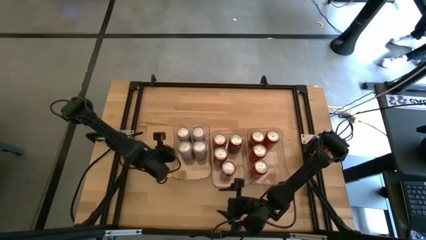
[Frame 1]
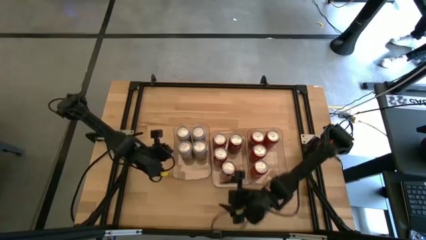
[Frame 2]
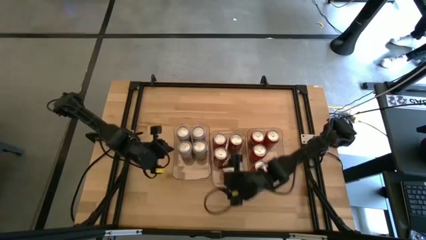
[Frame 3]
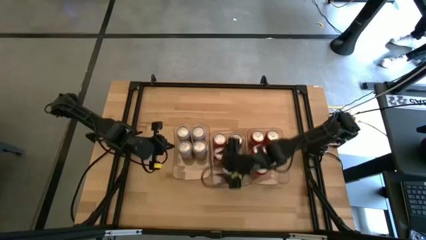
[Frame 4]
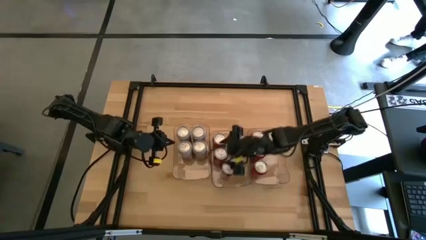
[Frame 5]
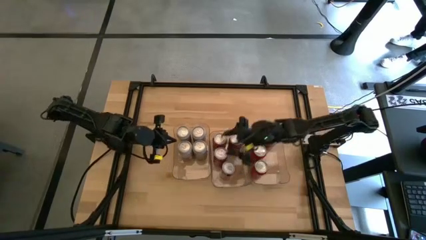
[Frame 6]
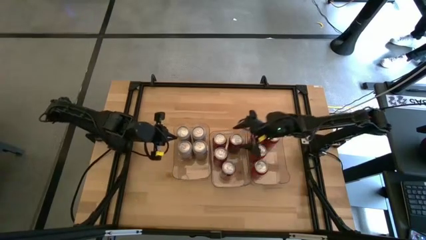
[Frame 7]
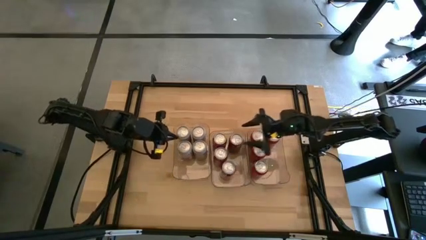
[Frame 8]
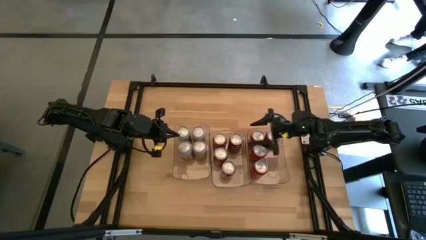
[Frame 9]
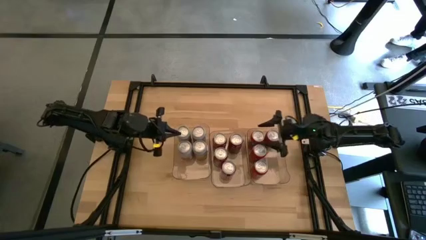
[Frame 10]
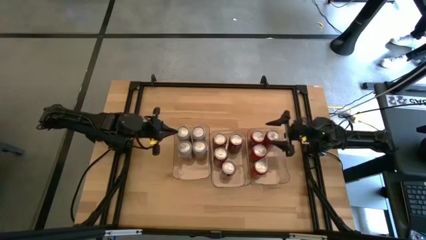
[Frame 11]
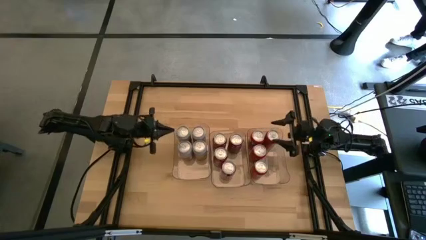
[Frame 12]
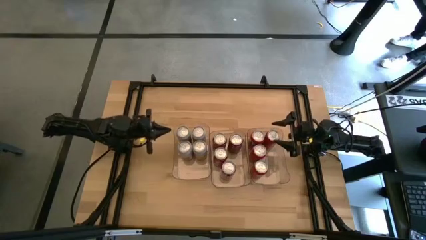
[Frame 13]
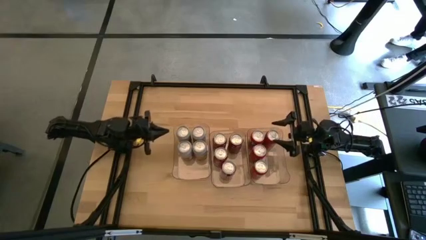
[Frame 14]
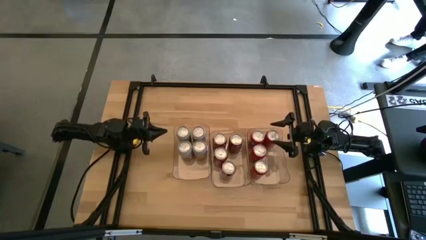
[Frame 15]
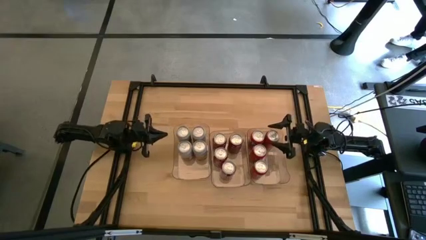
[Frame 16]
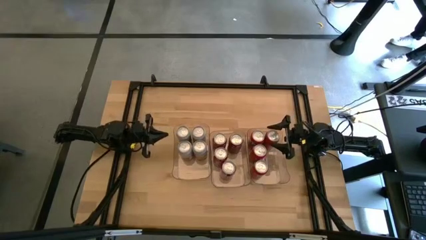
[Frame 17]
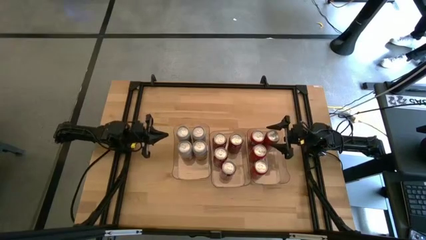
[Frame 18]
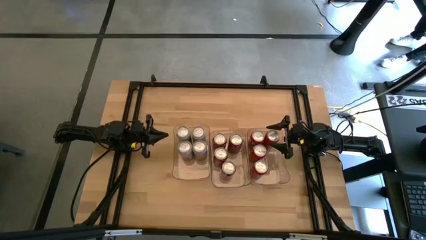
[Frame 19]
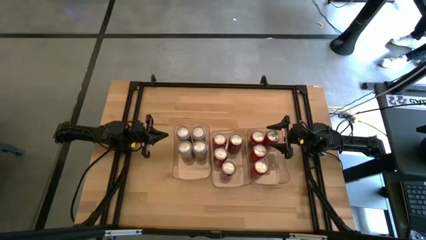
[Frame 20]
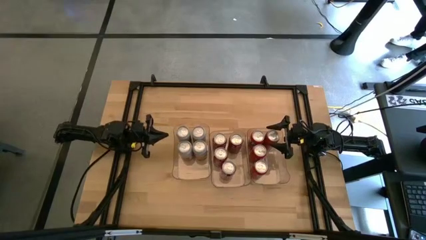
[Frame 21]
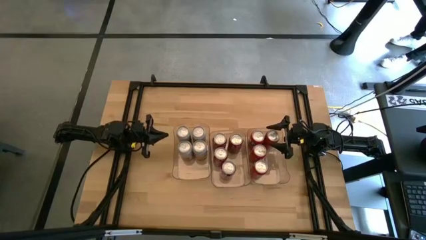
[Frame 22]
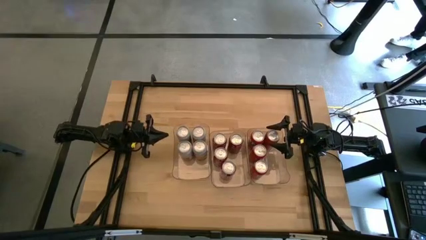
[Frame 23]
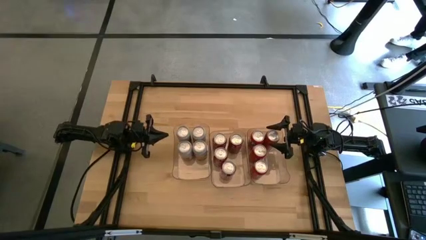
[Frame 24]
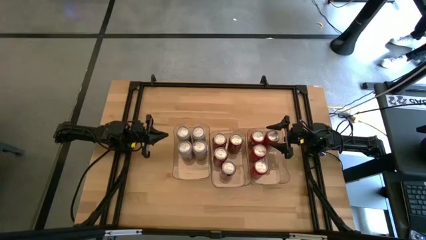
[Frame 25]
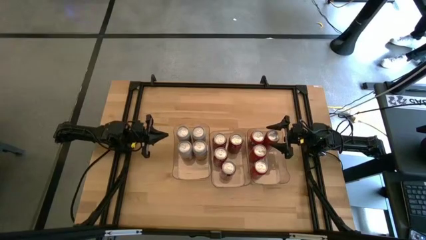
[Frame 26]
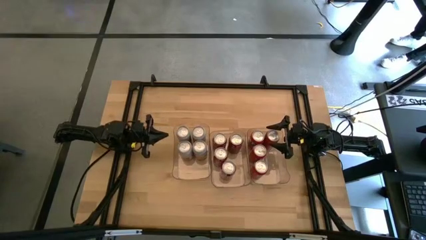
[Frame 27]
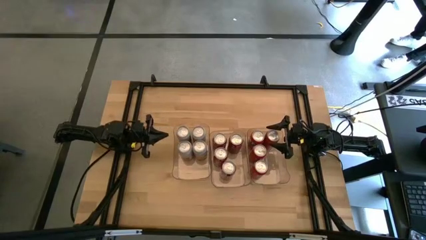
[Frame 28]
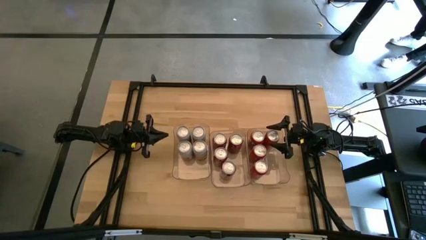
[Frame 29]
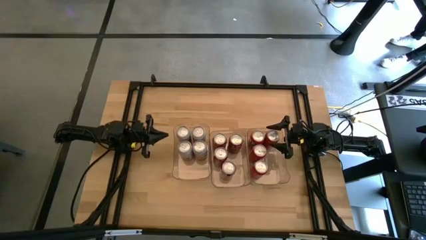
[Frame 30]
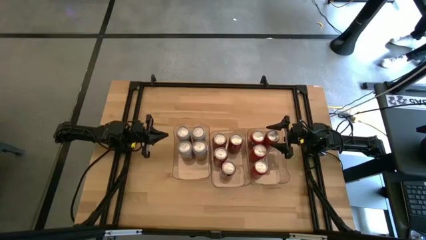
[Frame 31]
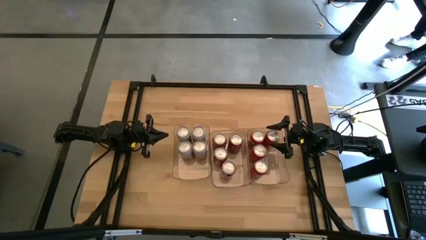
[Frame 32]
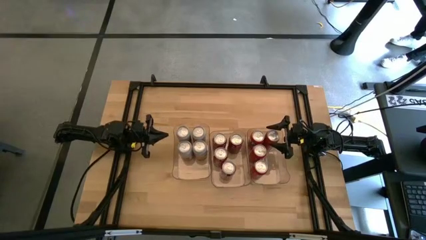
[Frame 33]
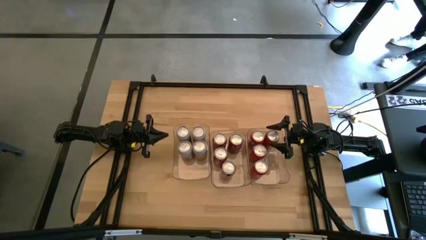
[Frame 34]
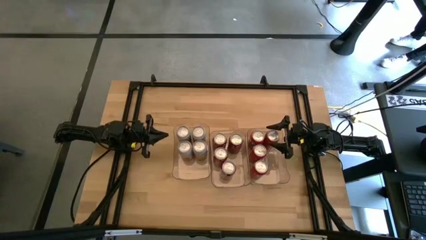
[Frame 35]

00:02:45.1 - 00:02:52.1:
Task: Sort soda cans
Return to Home Position

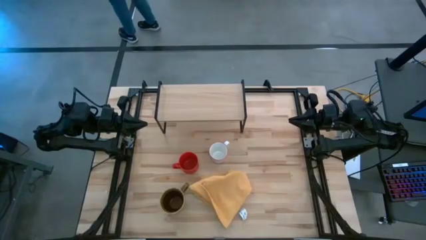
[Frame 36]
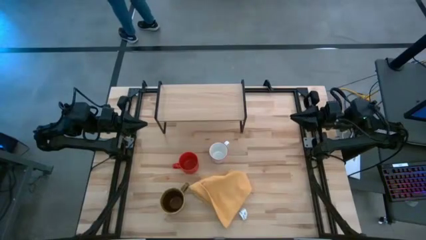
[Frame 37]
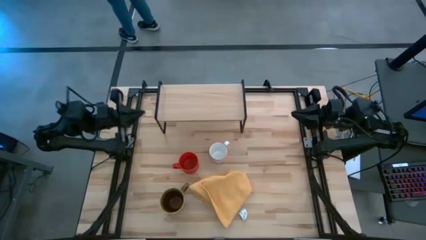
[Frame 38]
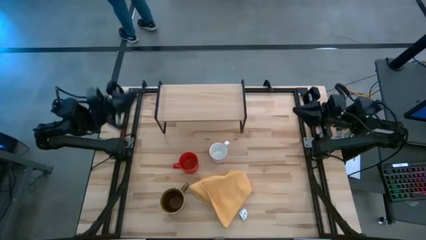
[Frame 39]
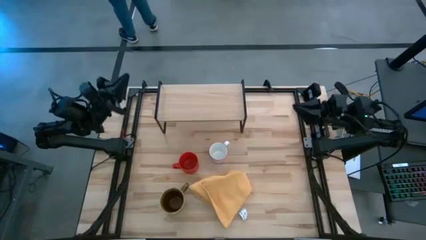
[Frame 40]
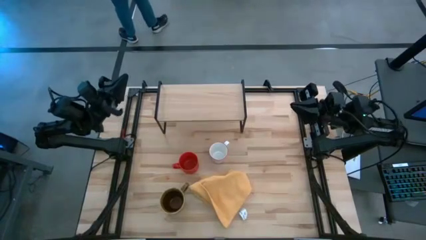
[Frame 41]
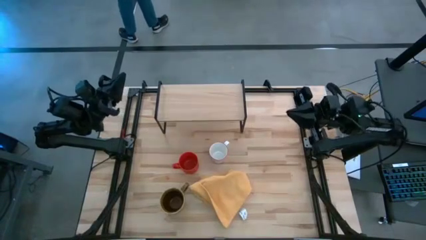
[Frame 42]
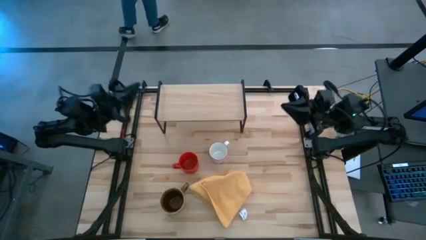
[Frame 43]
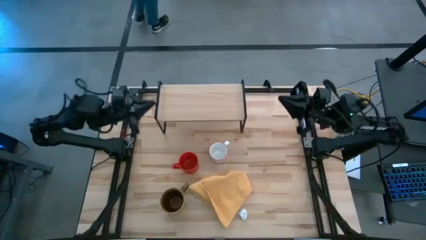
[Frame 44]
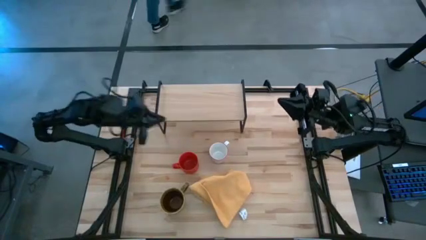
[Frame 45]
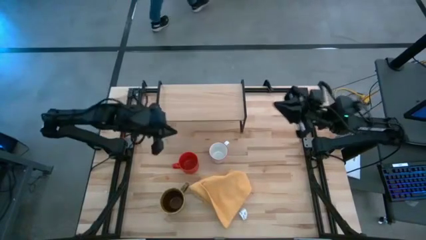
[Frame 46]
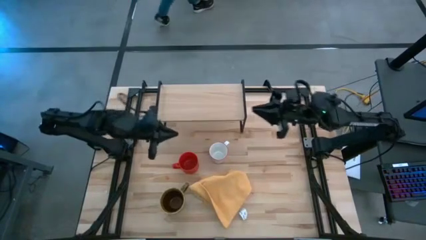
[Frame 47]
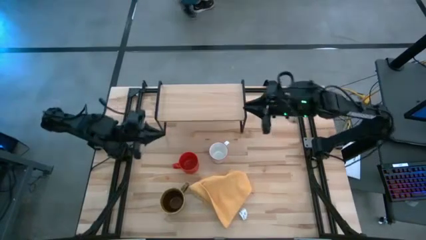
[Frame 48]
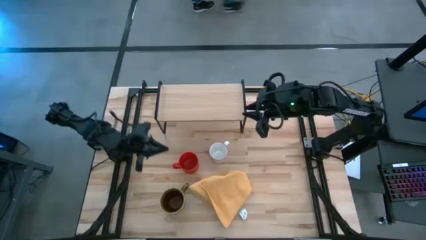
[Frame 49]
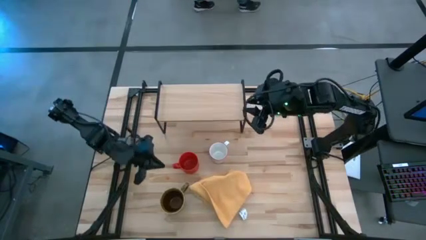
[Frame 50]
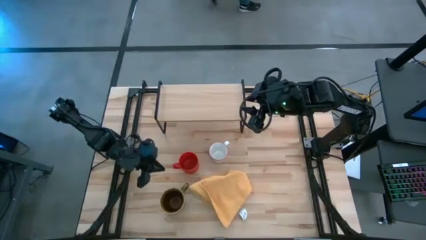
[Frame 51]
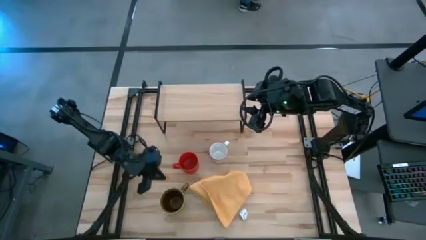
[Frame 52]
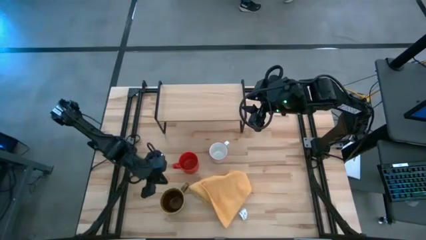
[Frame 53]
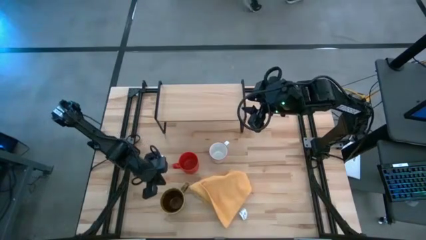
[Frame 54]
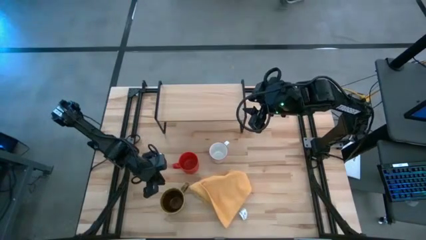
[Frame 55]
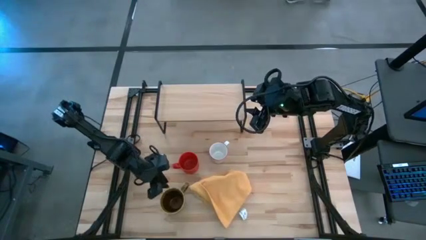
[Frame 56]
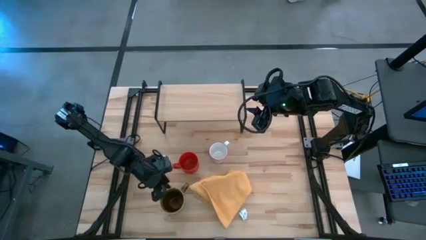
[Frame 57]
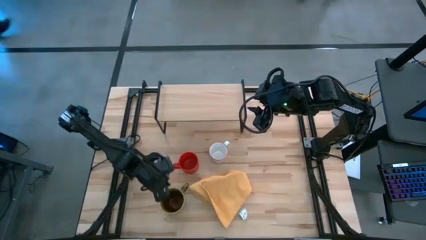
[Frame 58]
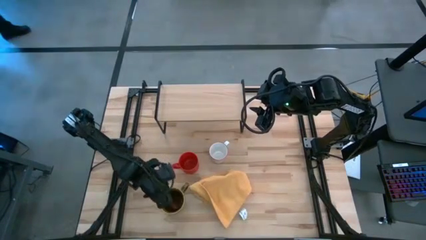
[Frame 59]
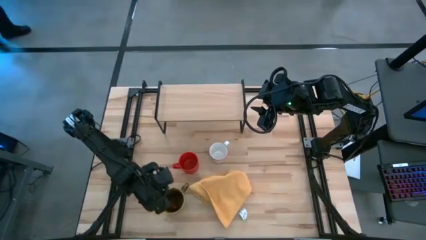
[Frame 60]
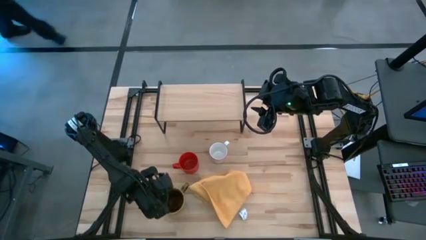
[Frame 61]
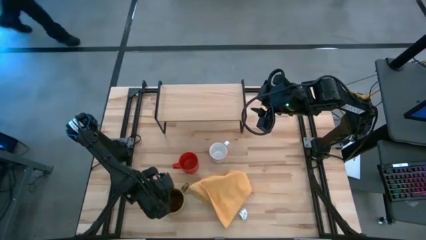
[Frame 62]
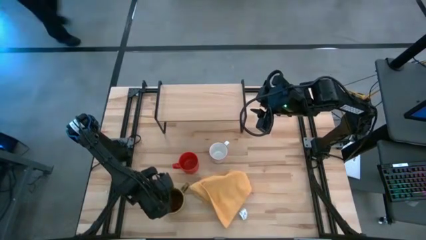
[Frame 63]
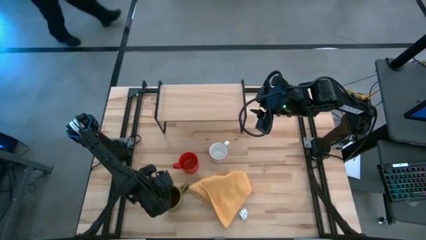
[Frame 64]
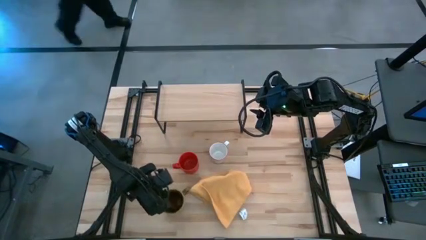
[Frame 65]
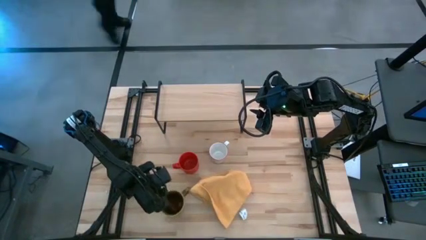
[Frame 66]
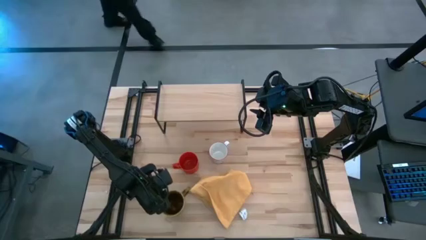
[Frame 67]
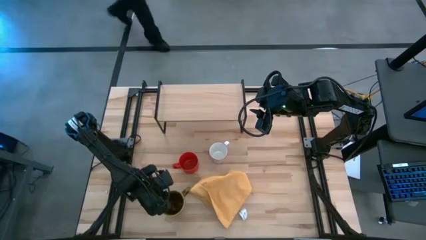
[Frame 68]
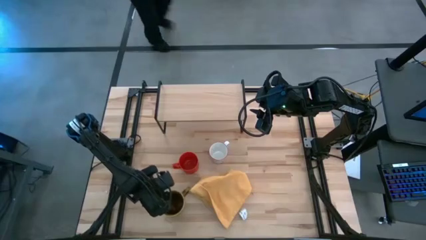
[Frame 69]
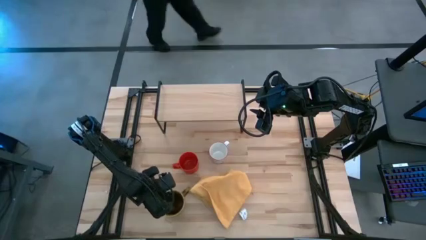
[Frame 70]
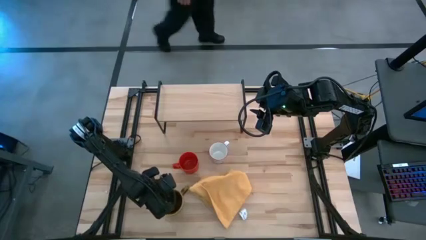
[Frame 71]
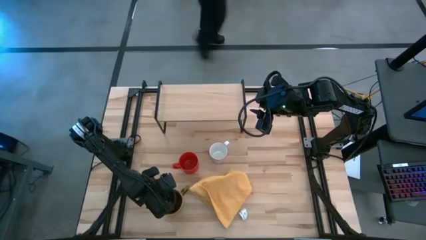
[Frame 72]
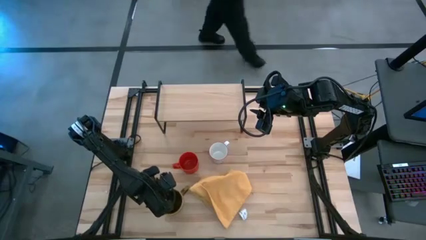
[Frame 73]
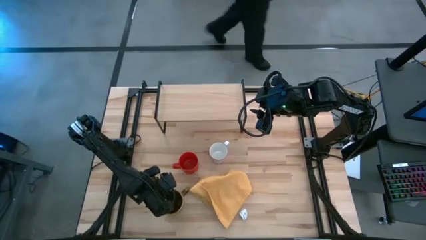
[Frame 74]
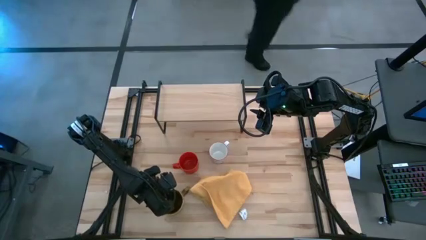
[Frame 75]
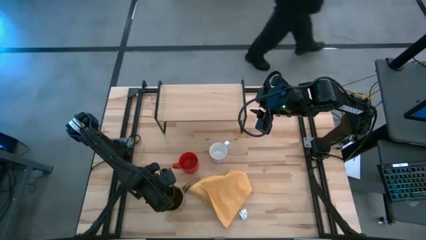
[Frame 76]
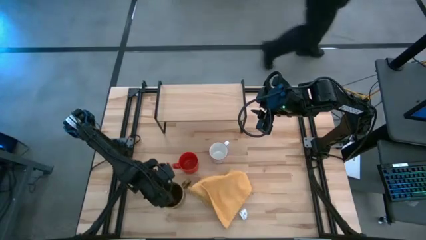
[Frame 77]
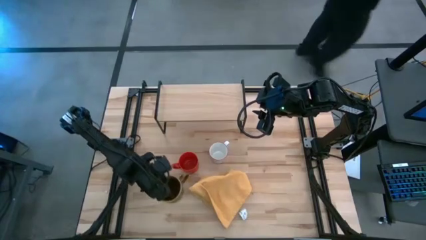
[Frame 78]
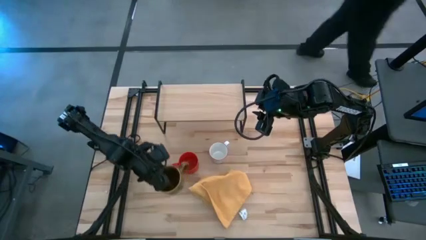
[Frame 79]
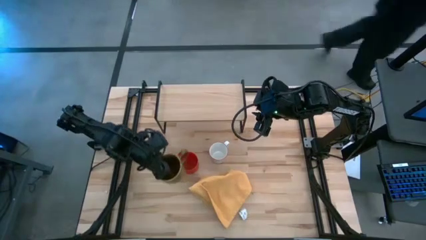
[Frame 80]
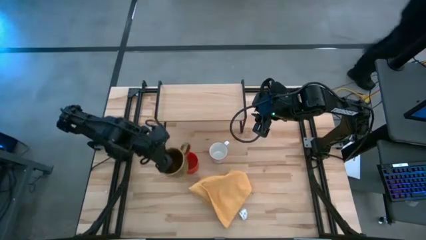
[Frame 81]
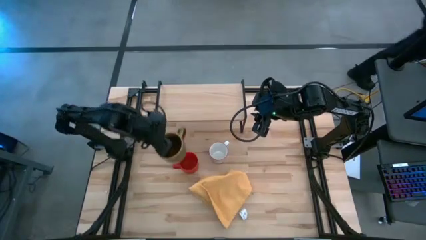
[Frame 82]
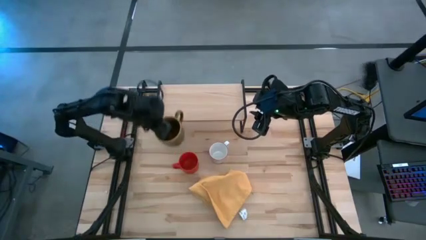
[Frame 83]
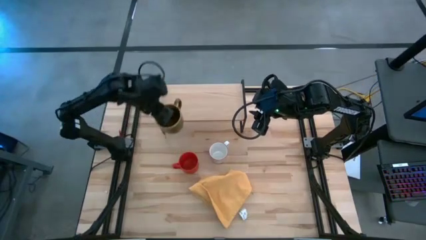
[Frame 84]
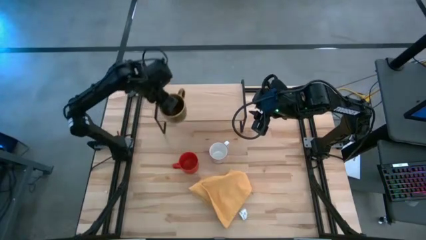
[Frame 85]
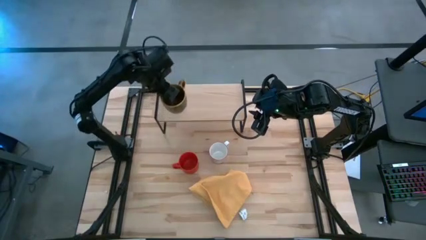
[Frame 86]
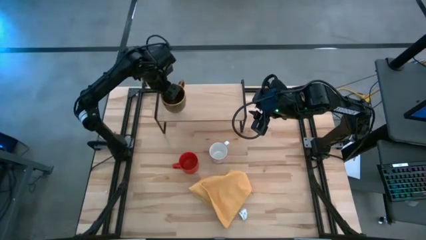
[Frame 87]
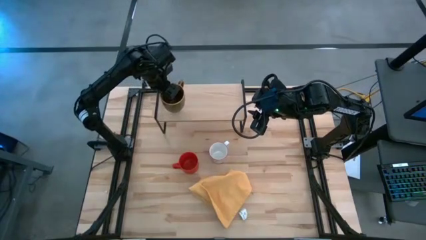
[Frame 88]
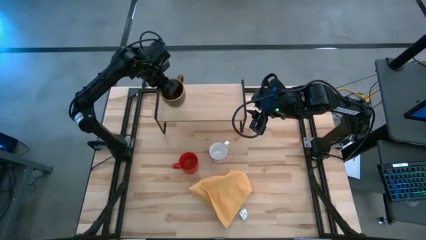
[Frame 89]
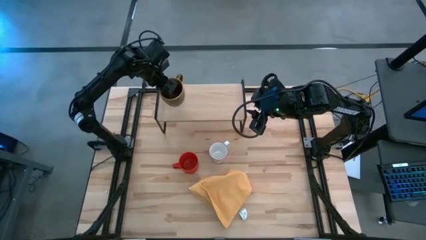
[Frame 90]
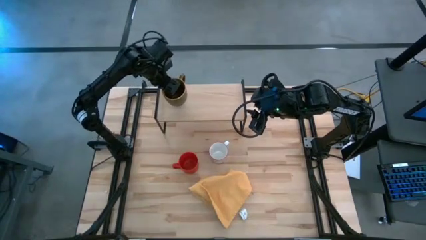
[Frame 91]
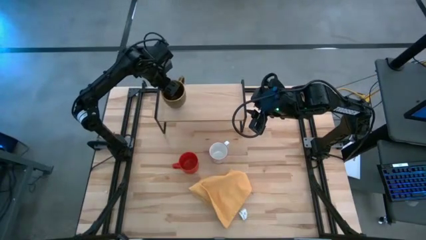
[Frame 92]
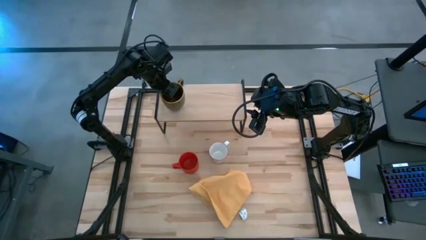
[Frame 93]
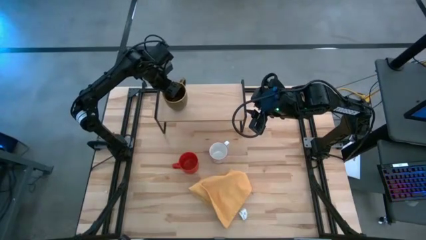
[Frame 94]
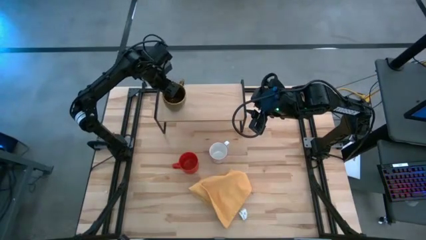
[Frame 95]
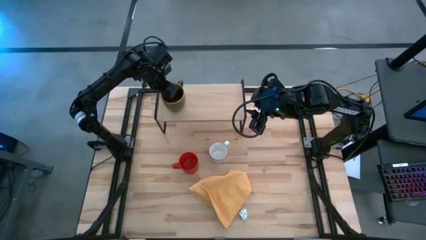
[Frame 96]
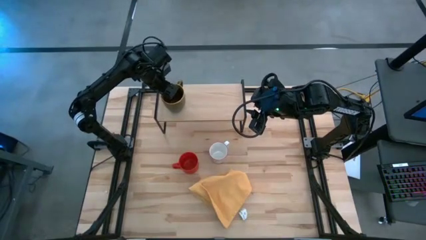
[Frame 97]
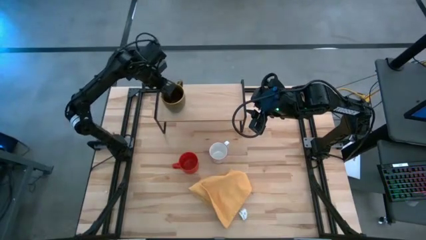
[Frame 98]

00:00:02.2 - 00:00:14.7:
Task: Stack small to large cups/mugs on shelf
Put the brown mug on the shelf
